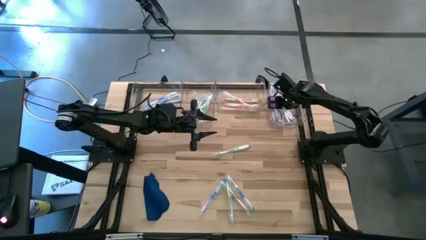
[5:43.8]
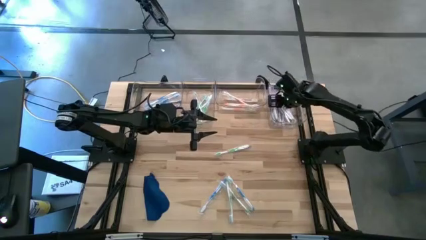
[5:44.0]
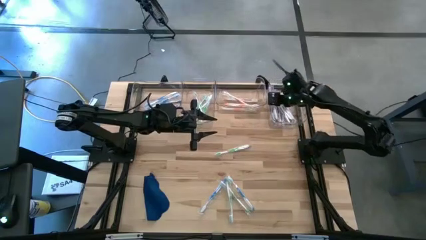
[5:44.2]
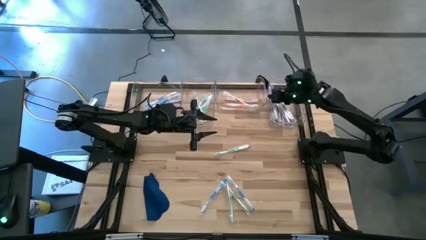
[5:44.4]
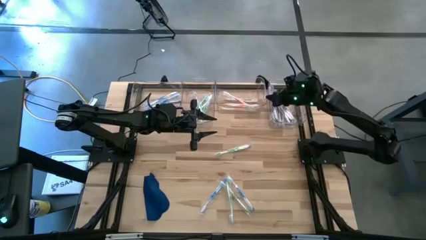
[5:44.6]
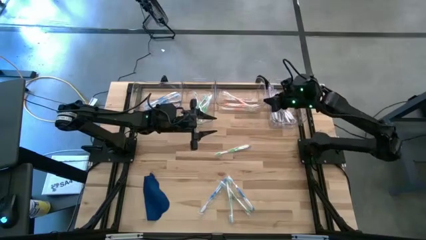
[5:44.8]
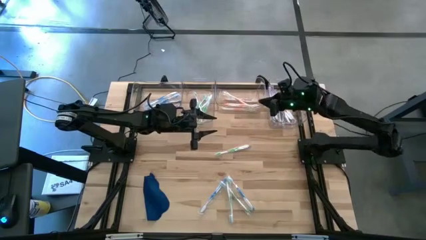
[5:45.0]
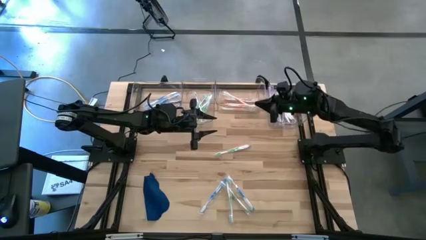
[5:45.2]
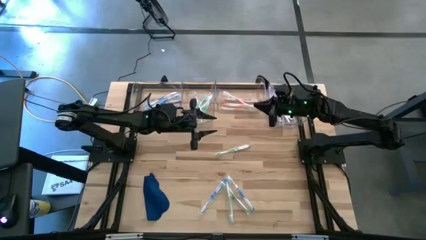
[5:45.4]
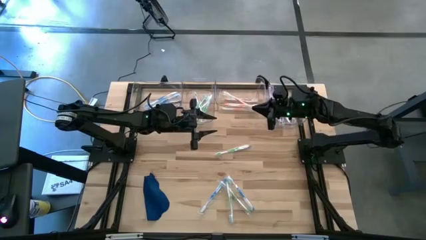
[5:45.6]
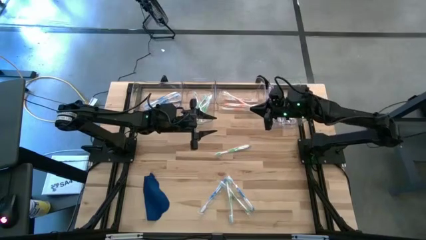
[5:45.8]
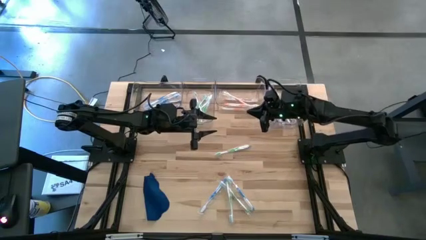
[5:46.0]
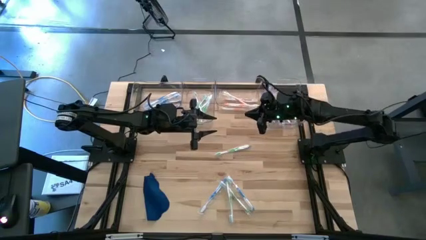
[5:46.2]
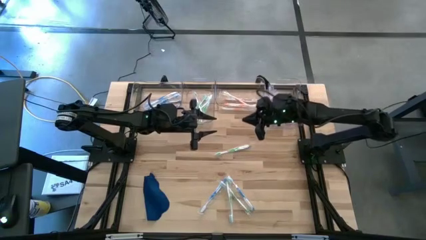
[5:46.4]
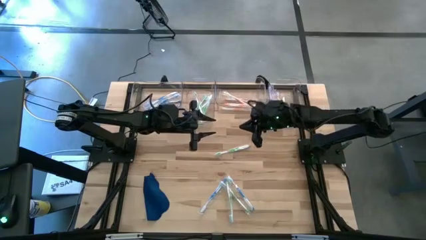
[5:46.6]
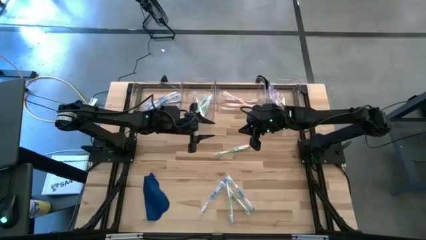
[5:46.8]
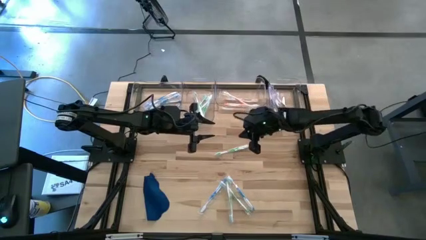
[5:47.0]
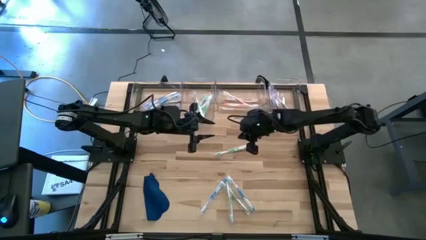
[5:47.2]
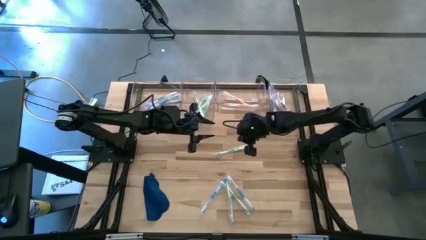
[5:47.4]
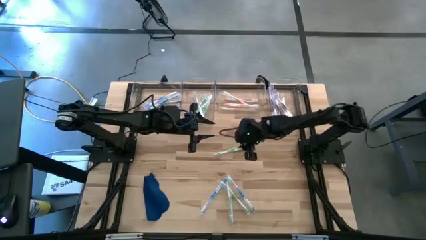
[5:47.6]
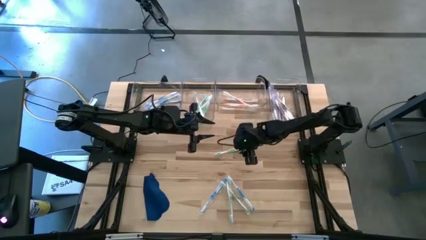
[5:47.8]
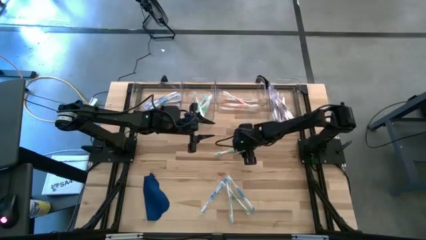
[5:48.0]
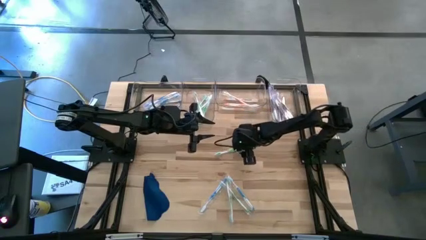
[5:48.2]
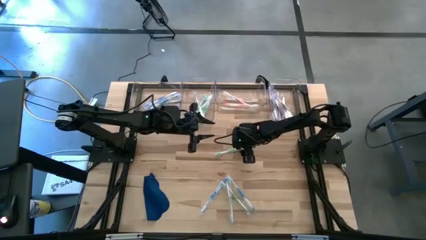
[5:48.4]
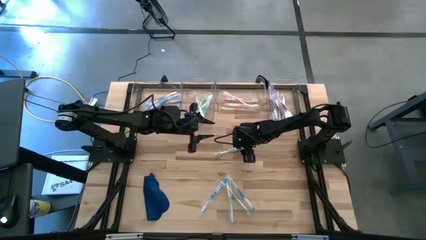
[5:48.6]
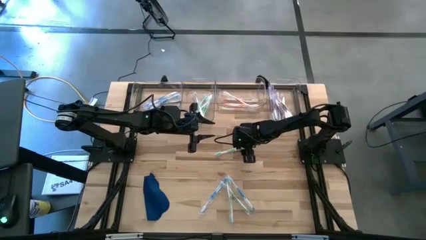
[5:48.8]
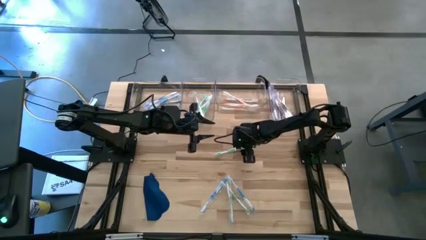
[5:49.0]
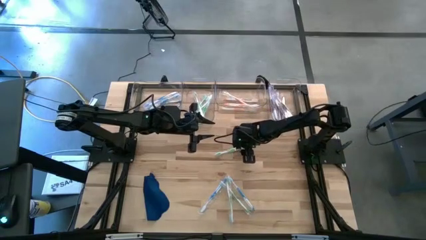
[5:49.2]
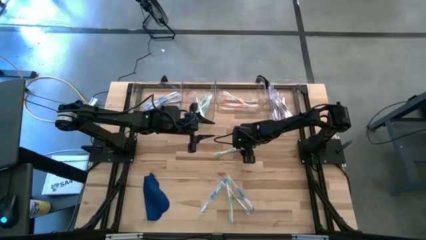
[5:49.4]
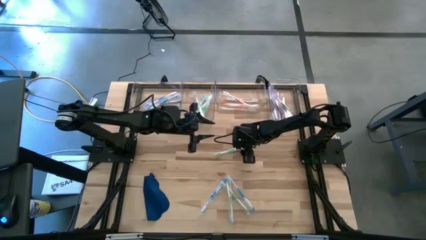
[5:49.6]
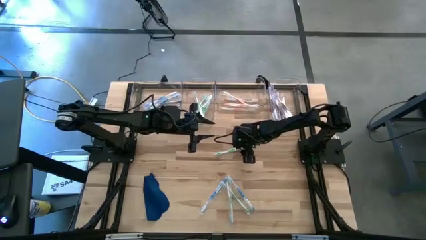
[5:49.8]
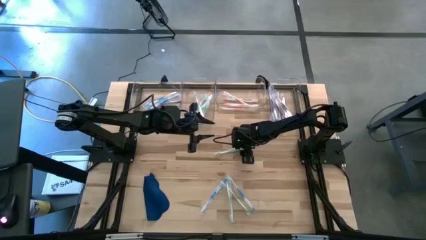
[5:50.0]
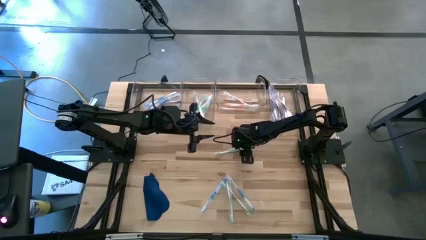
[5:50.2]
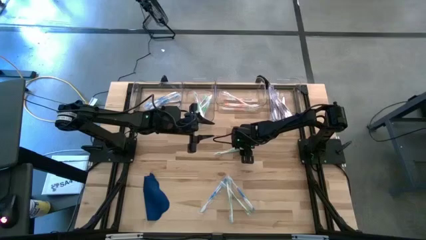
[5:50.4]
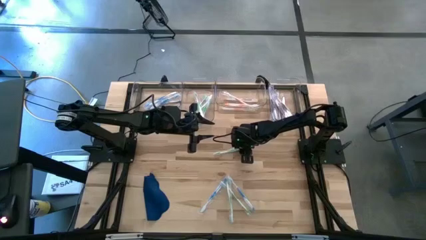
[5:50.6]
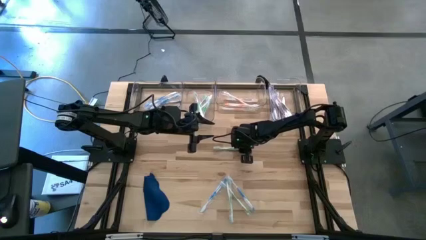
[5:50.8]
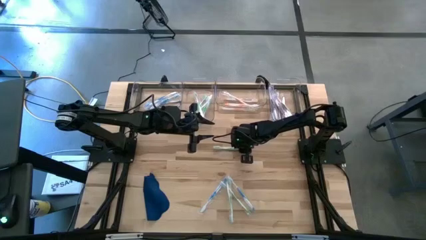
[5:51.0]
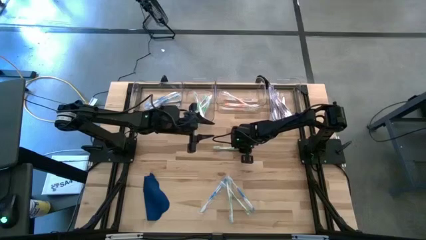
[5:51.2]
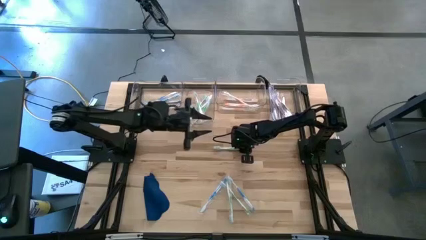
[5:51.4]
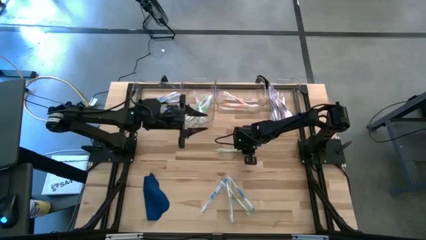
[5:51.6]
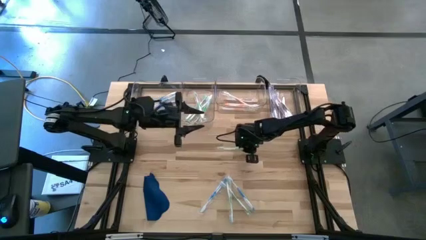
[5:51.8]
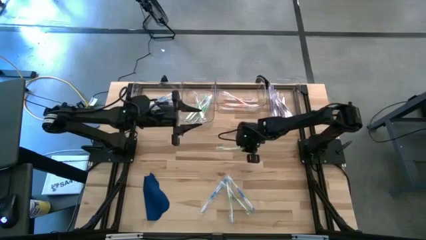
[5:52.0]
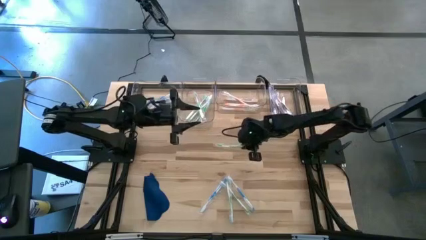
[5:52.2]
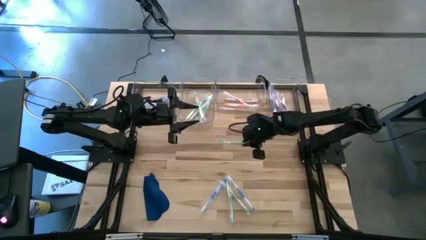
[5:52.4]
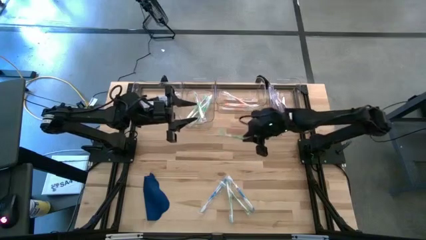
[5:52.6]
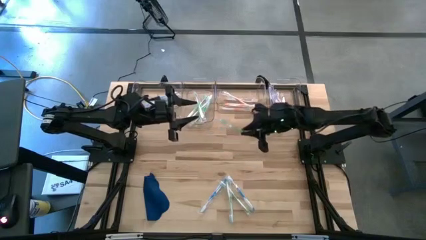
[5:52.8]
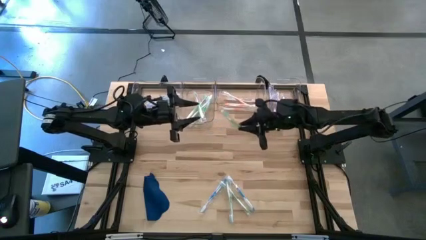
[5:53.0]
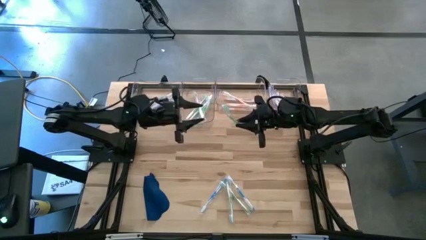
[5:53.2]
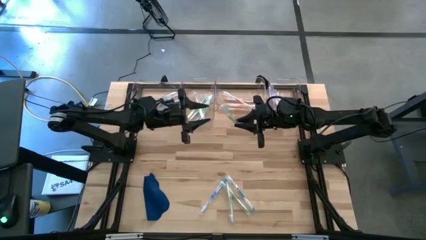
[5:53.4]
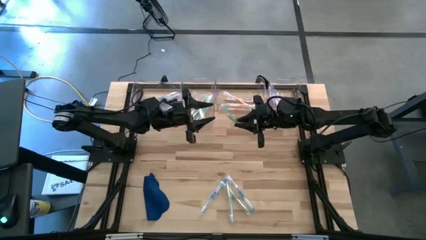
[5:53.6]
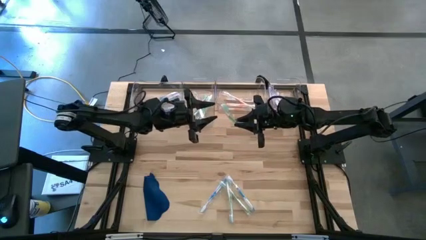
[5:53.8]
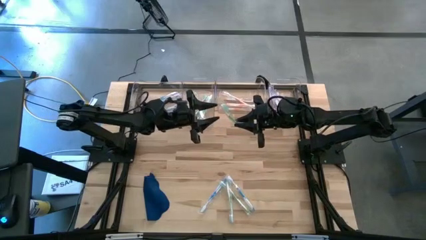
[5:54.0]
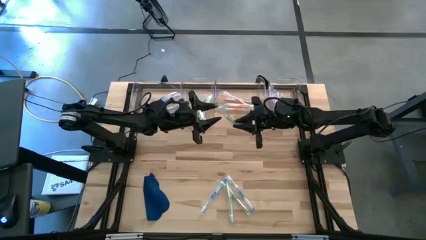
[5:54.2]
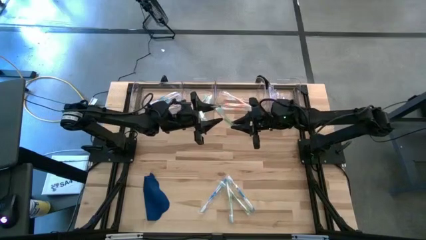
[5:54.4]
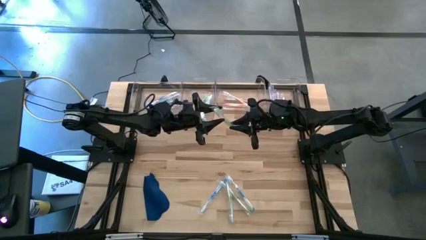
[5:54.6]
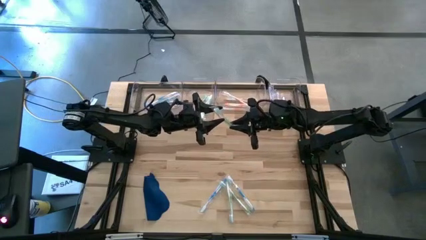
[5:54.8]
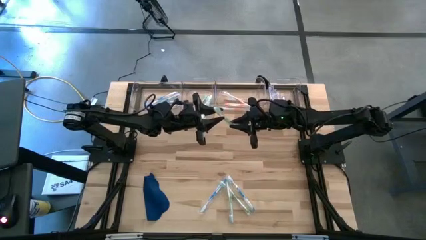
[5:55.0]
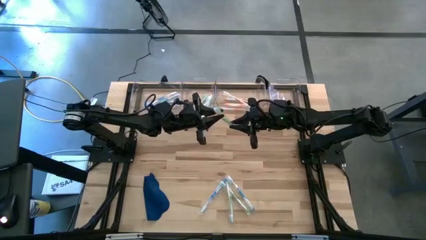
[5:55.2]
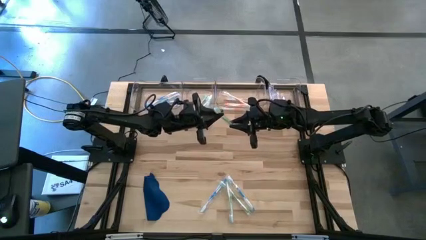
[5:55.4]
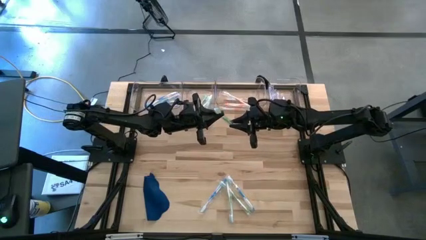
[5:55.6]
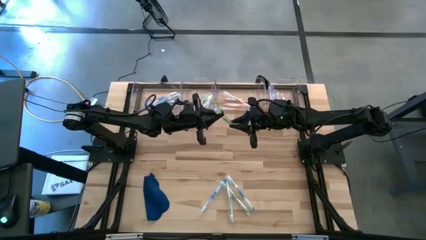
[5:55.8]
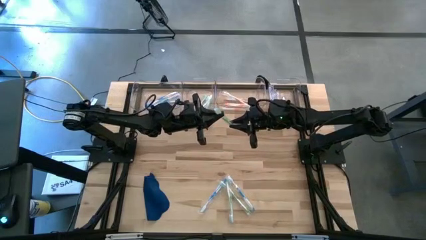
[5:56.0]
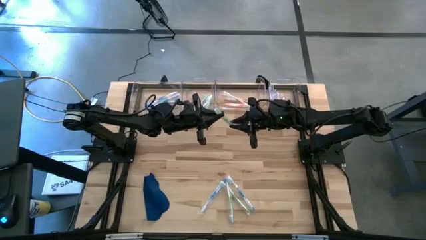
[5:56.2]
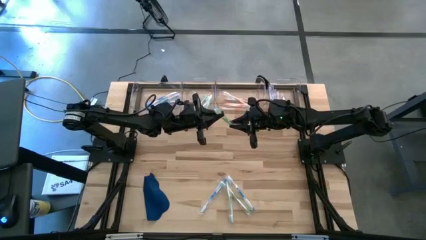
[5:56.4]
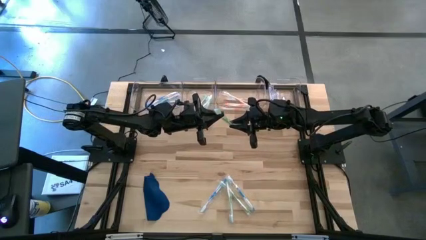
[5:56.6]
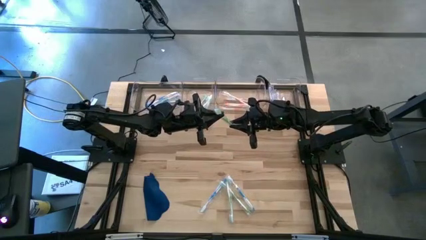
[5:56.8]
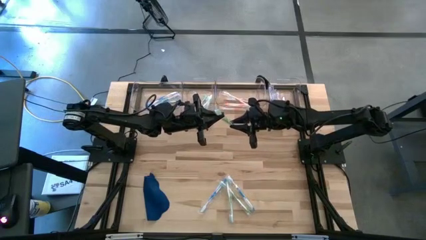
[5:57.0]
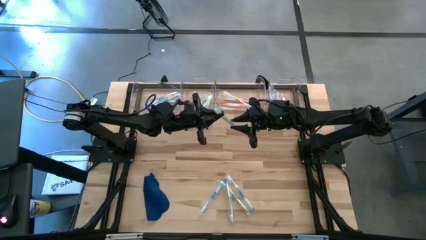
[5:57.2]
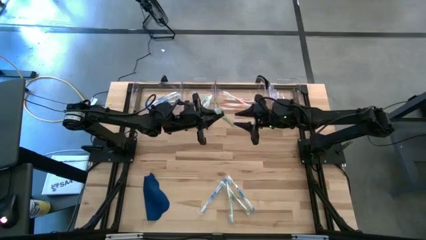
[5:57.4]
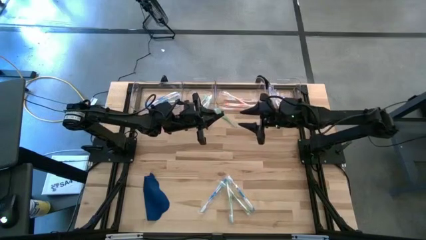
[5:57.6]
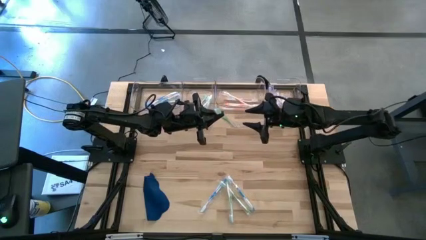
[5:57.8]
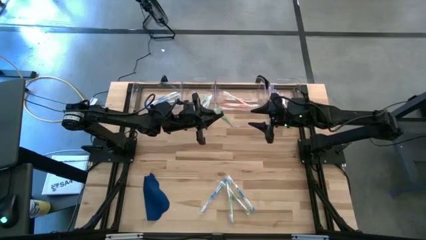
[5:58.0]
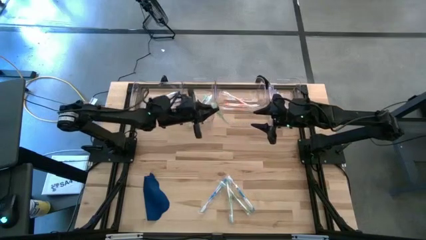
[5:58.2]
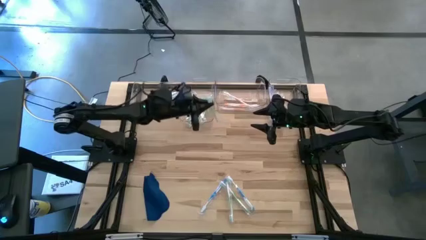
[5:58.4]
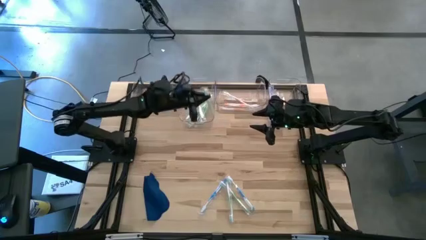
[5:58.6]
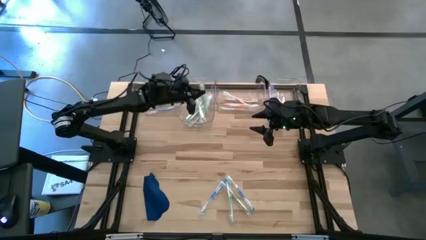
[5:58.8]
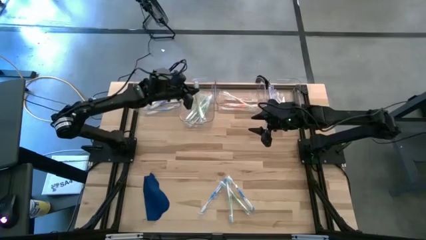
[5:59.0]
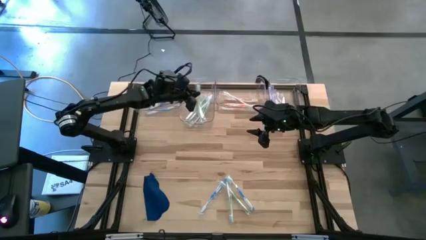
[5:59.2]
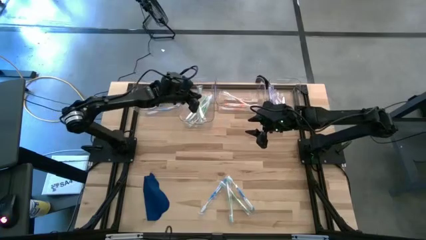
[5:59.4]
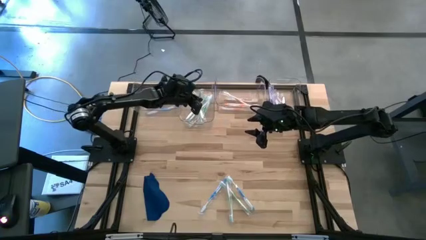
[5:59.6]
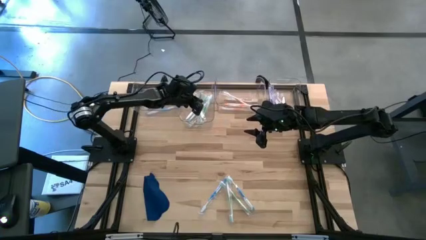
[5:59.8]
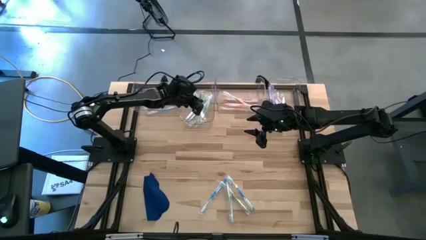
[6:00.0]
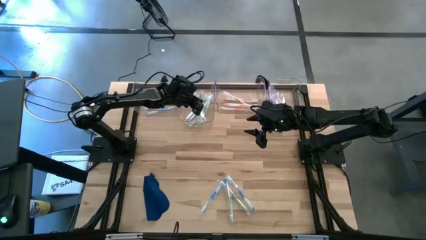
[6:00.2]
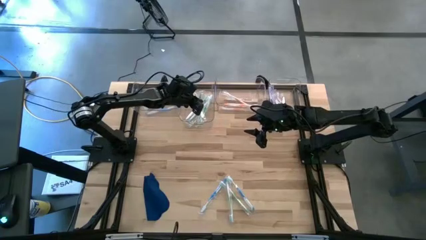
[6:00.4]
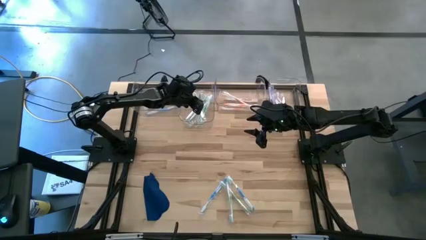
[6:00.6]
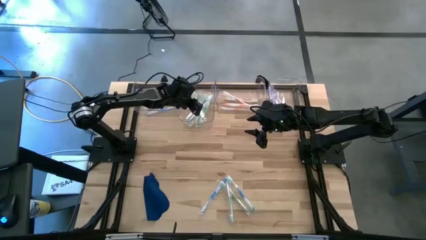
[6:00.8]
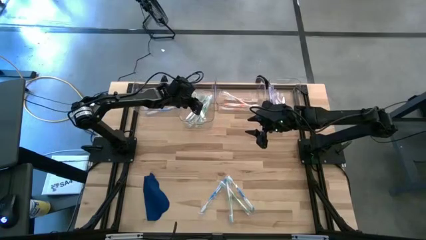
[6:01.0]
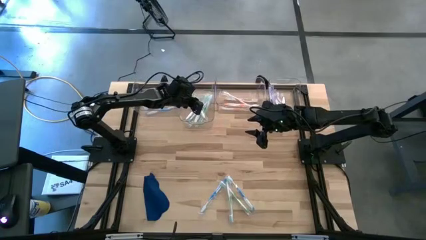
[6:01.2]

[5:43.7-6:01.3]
Task: Pick & Place Toothbrushes
Put the green toothbrush into the middle left transparent bin
